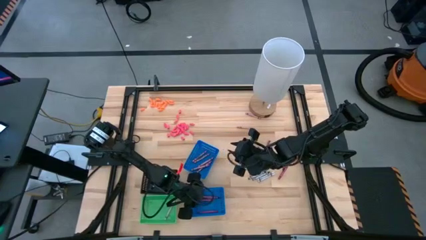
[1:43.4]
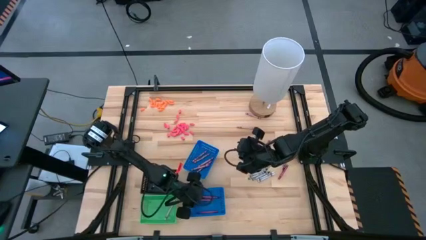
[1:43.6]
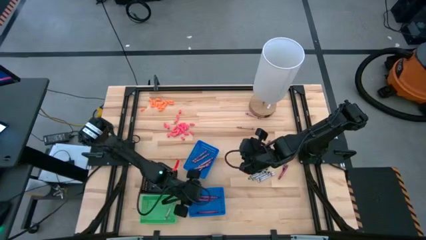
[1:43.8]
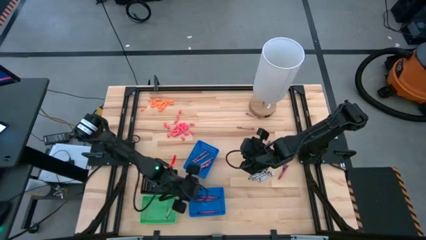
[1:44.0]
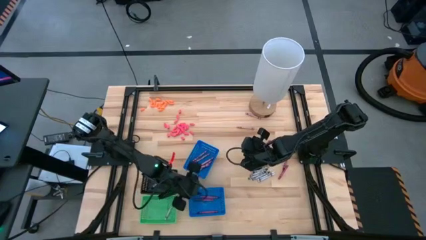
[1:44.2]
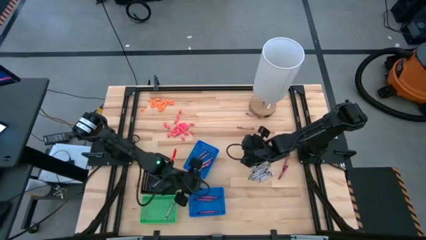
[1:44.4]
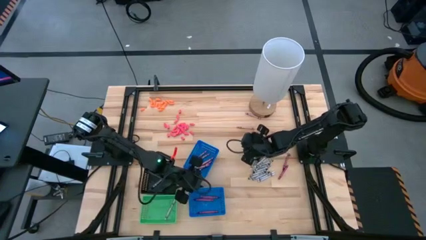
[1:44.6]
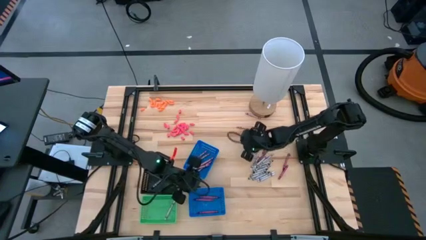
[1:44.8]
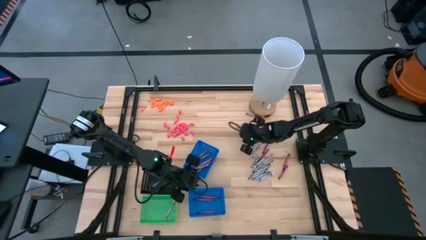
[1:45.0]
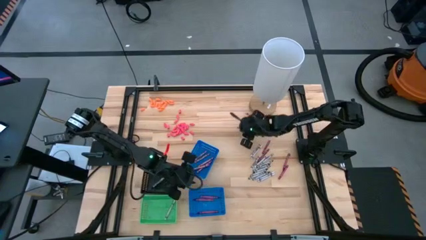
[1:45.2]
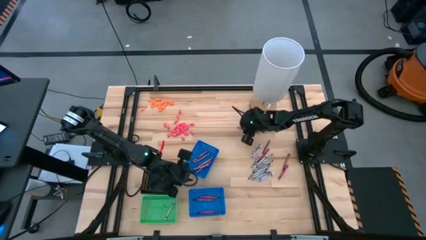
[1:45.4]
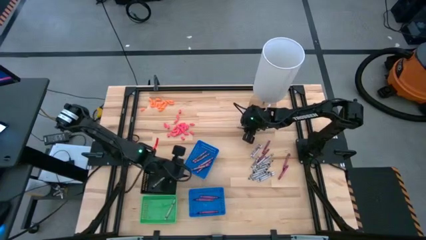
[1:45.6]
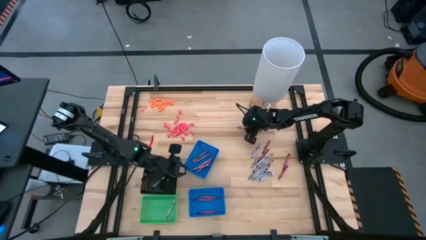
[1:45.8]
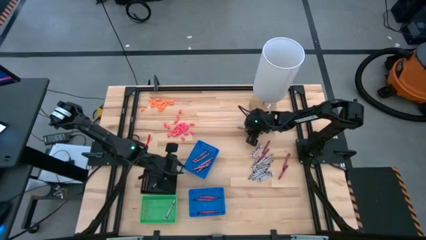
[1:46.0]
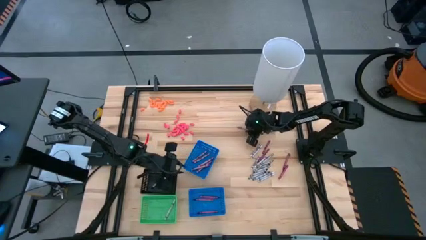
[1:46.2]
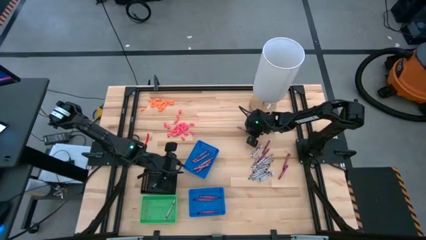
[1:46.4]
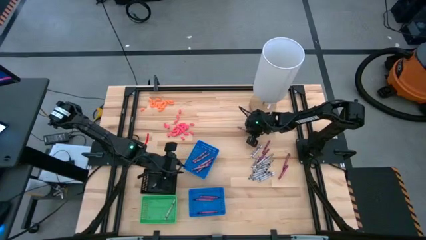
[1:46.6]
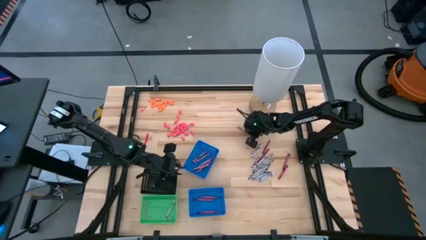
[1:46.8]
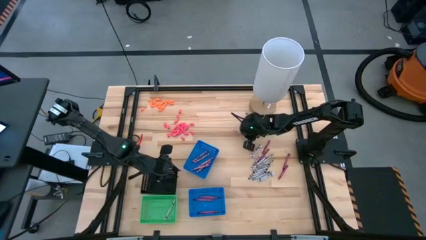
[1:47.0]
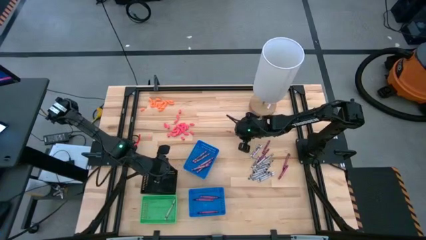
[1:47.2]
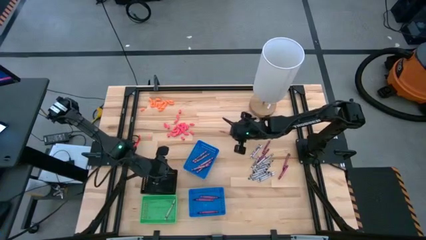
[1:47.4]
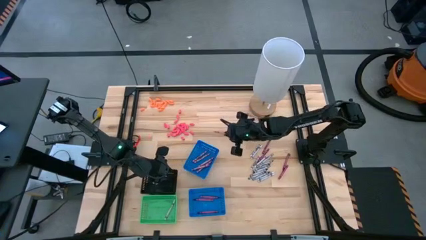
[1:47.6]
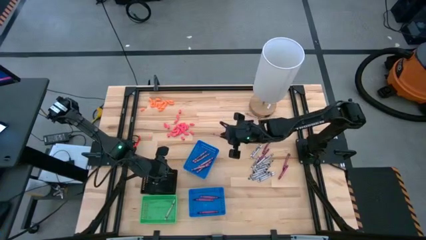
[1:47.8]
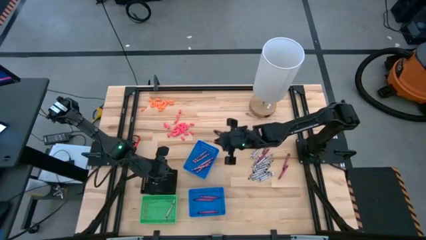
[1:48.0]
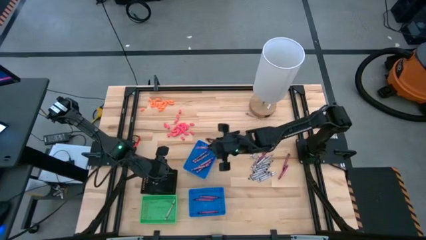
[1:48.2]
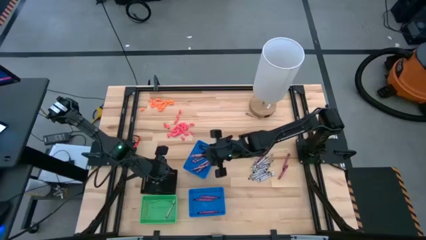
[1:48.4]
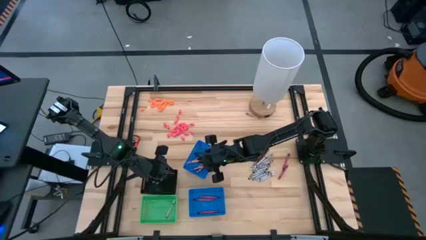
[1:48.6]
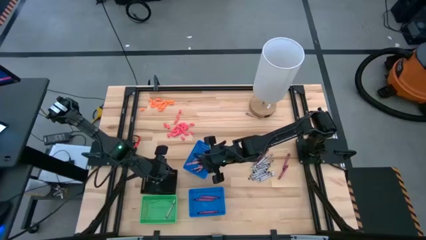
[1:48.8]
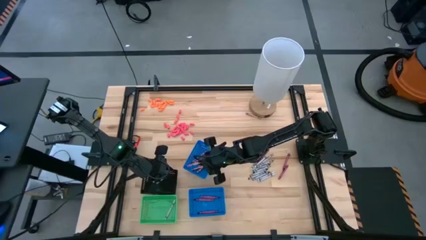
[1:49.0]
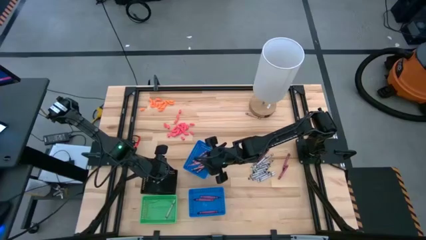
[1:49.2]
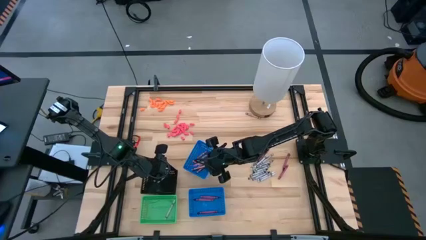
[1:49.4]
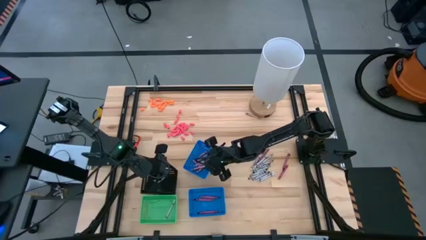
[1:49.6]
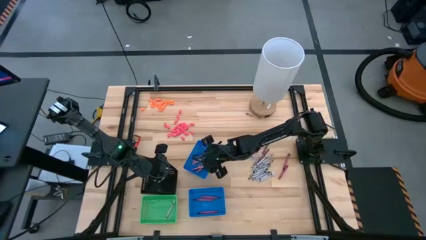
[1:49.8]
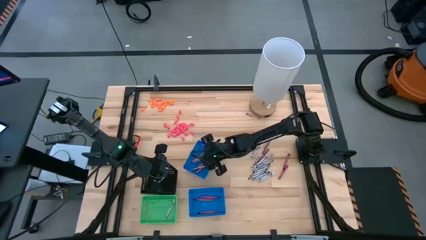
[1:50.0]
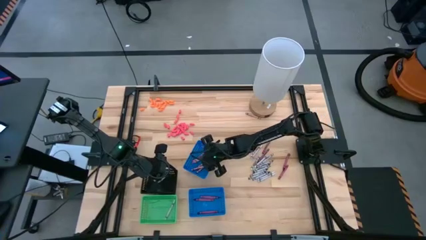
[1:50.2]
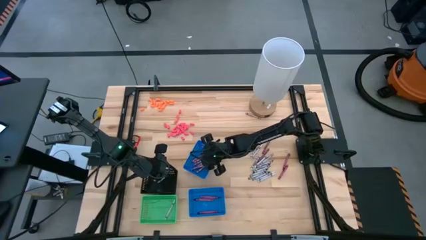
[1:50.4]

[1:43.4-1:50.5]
Task: Sort crayons
Put the pink crayon into the top blue bin

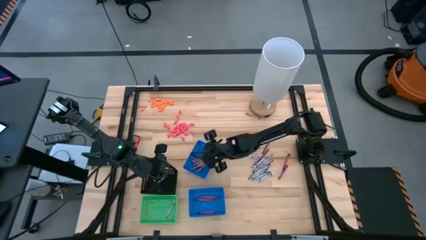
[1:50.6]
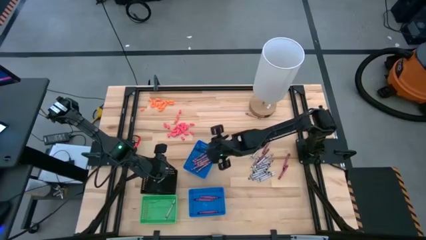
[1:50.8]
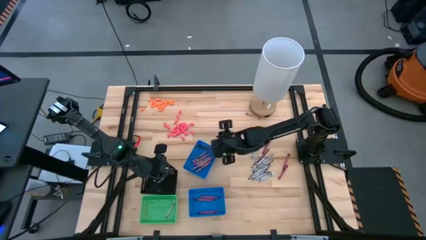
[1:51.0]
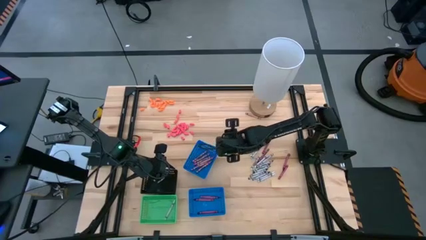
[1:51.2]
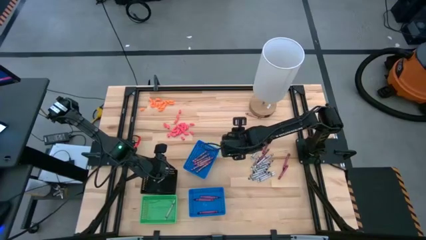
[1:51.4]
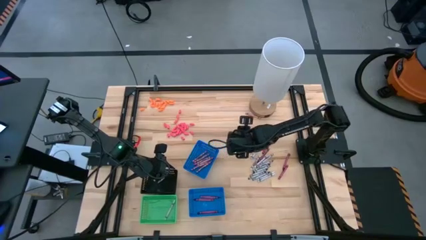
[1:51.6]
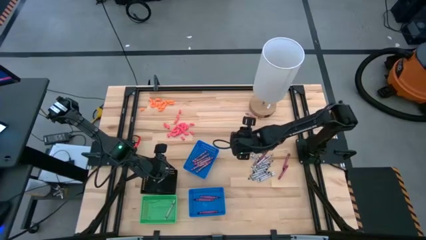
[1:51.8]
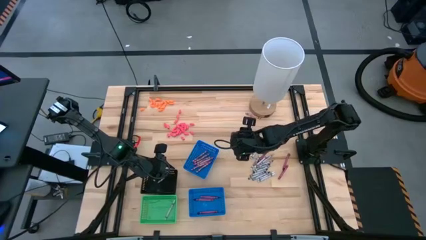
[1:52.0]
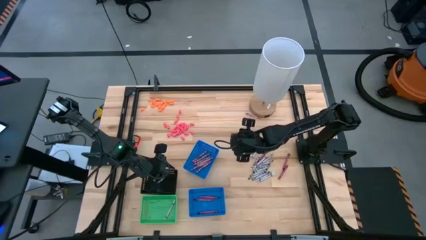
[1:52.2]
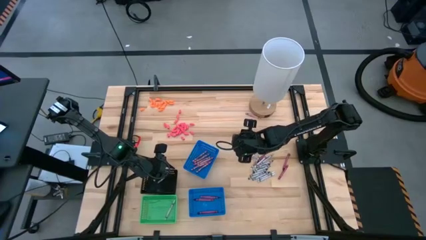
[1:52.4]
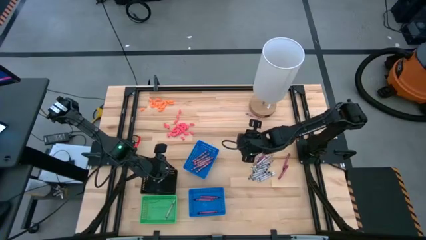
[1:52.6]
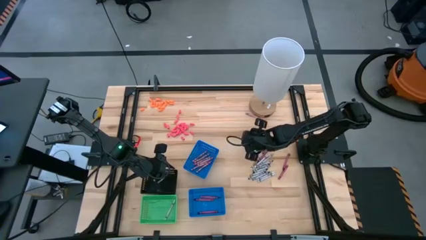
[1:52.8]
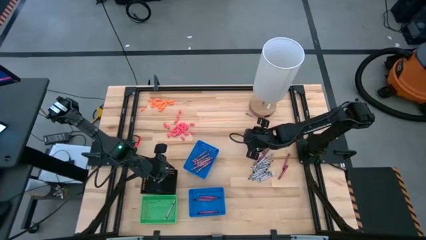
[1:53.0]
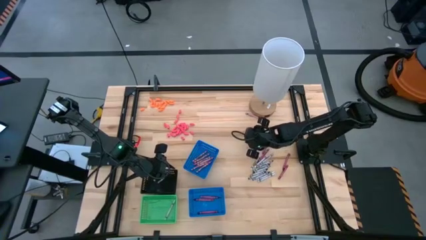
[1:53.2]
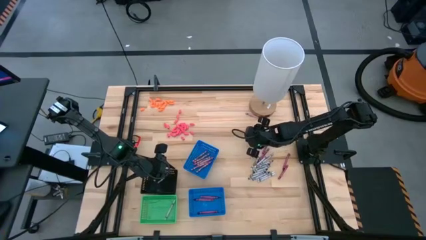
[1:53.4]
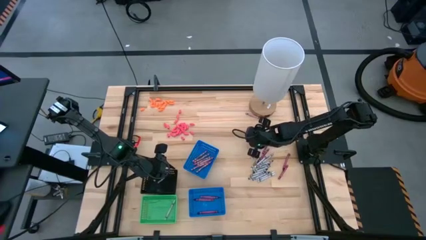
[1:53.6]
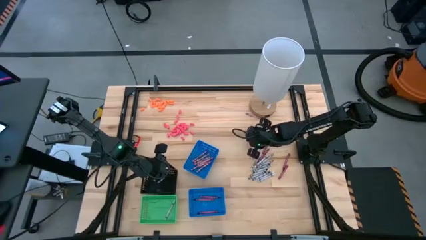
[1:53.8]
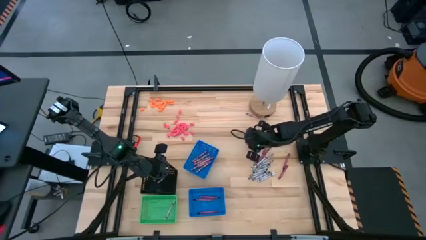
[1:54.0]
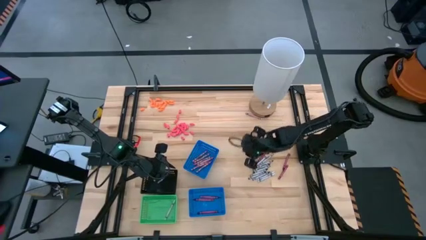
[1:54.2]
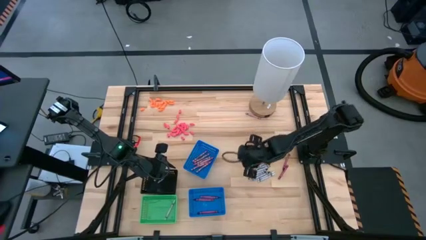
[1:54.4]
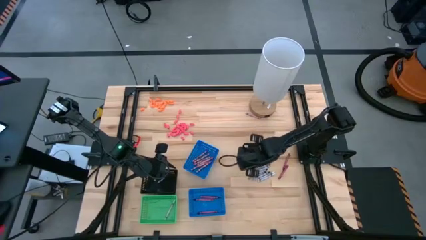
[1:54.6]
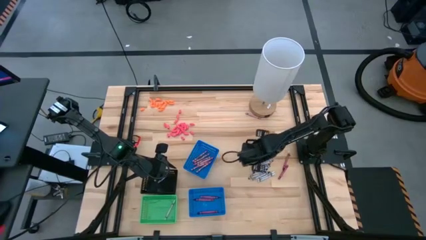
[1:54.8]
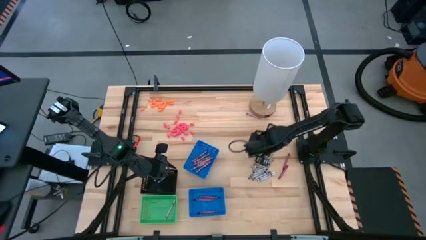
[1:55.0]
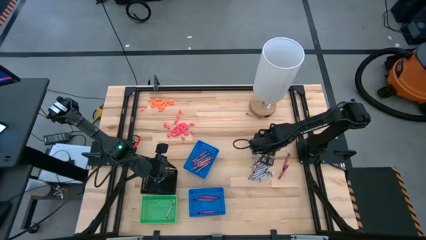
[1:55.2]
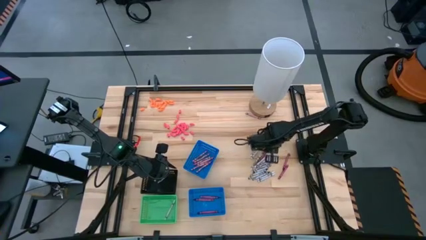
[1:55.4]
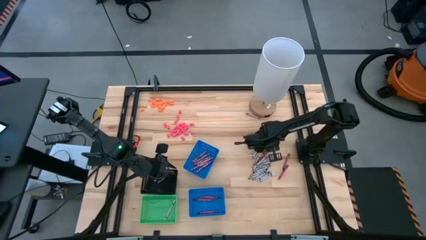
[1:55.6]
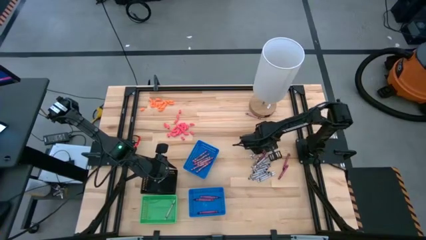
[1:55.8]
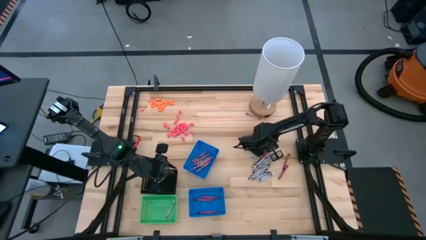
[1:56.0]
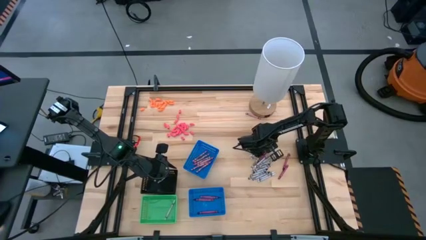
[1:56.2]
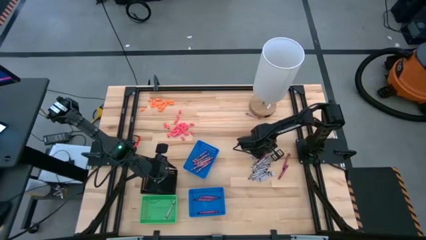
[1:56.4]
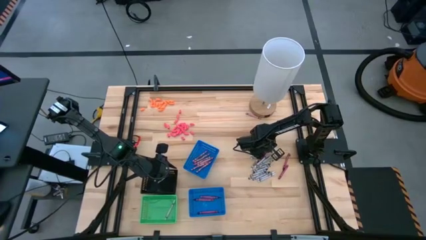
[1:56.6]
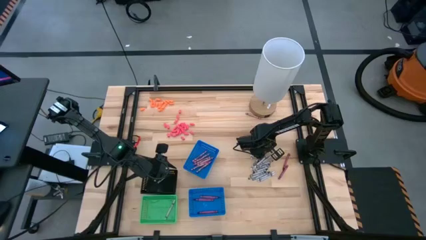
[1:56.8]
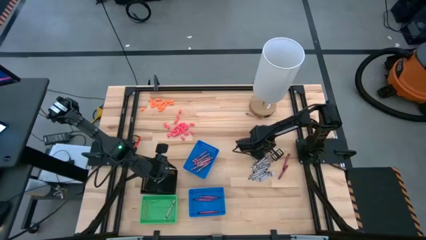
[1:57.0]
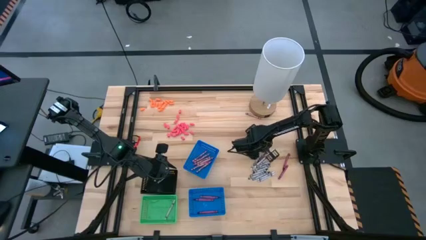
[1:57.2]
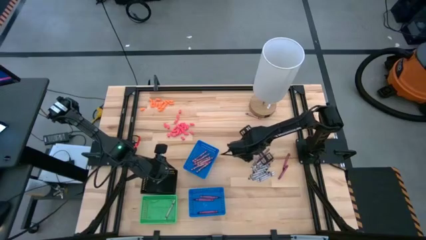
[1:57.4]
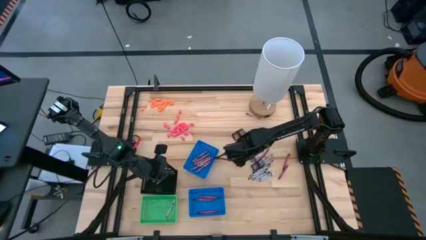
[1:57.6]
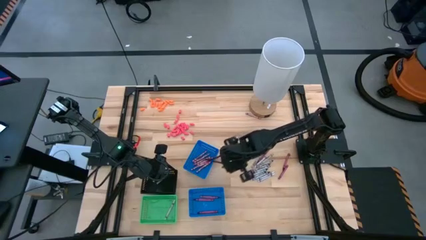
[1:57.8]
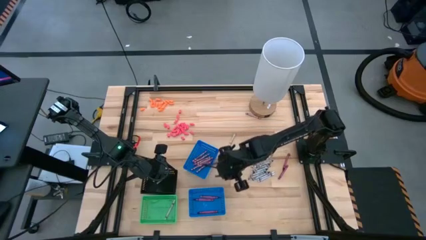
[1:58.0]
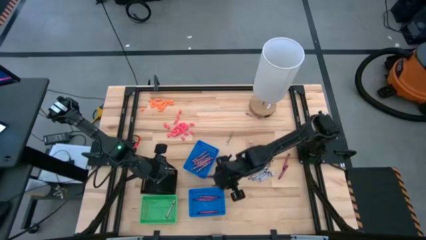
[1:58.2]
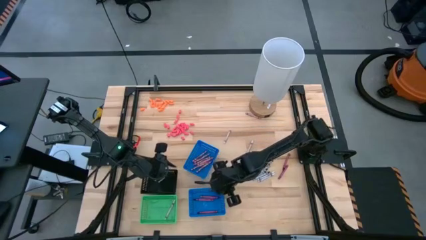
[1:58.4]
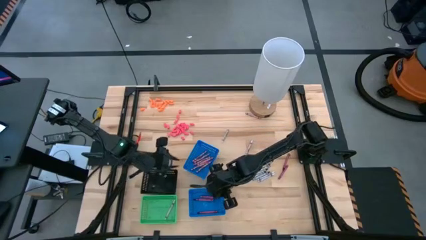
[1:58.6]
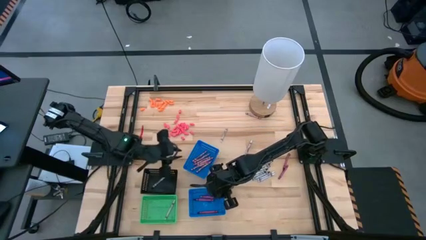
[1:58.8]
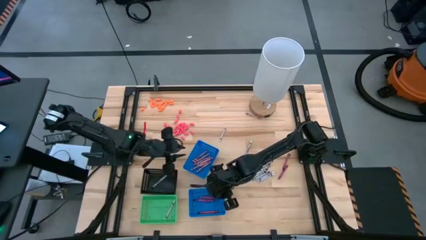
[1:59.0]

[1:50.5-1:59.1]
Put the violet crayon into the bottom blue bin
